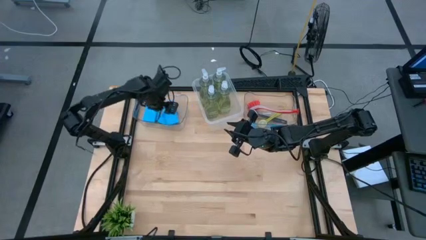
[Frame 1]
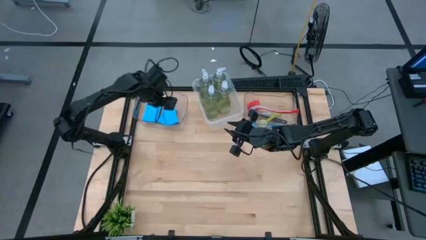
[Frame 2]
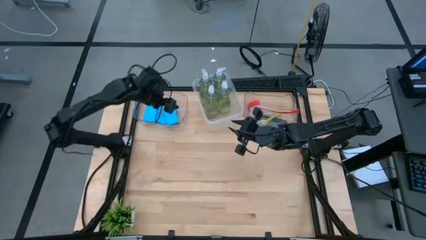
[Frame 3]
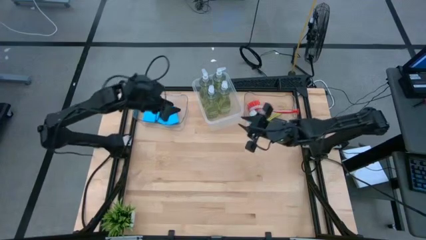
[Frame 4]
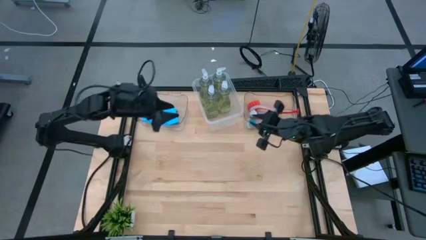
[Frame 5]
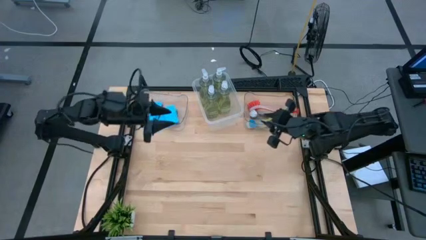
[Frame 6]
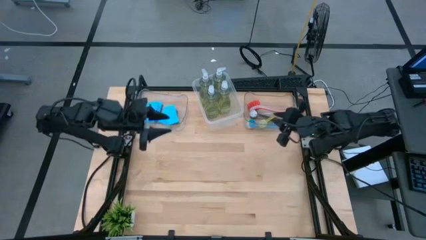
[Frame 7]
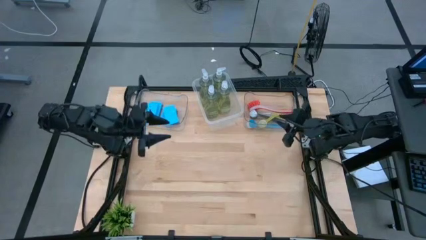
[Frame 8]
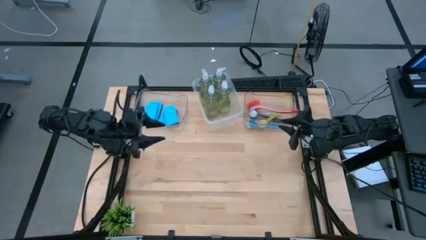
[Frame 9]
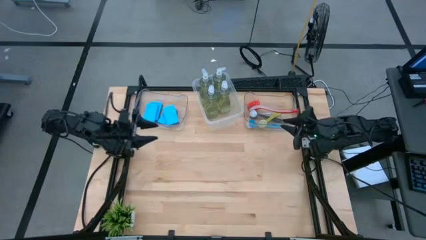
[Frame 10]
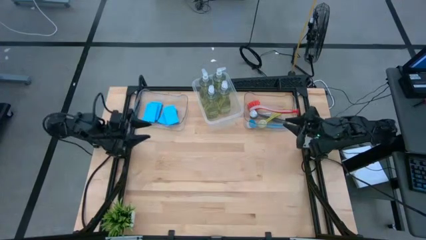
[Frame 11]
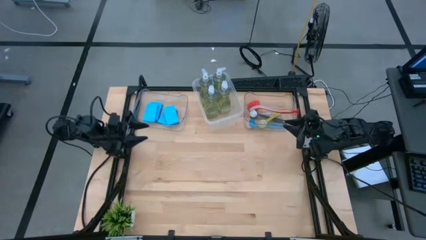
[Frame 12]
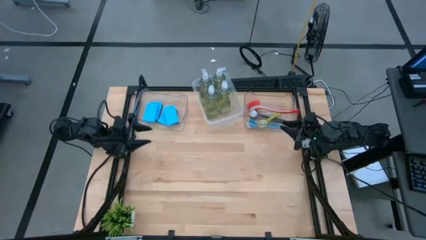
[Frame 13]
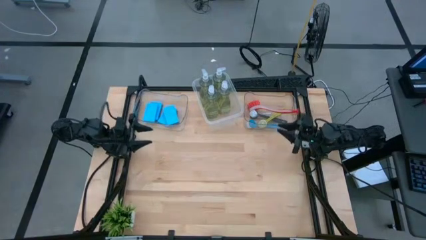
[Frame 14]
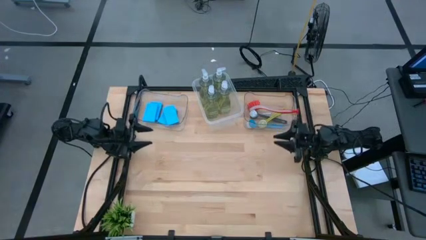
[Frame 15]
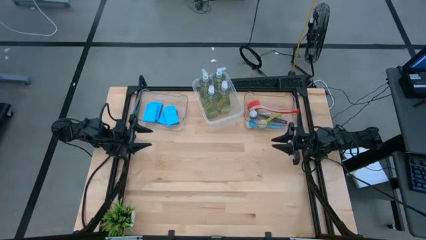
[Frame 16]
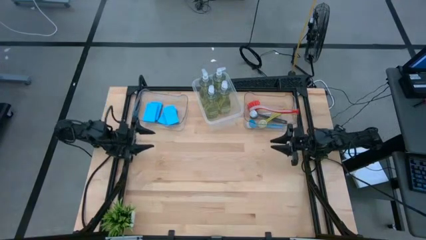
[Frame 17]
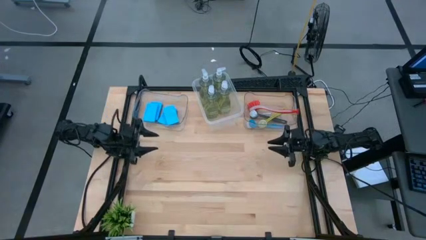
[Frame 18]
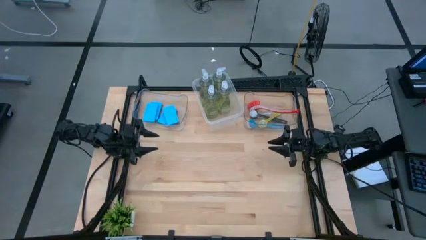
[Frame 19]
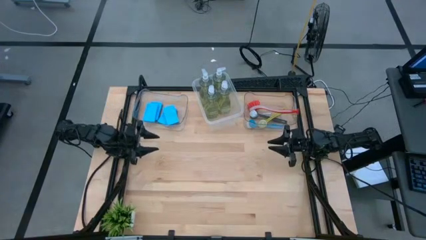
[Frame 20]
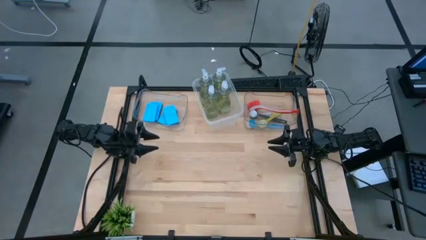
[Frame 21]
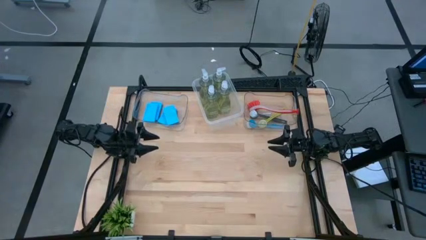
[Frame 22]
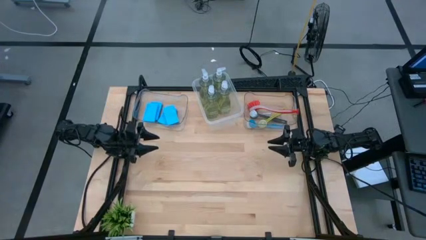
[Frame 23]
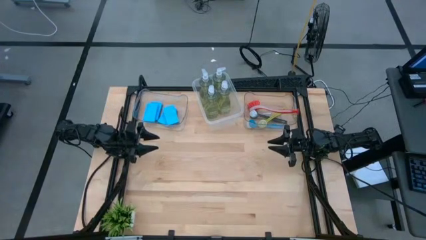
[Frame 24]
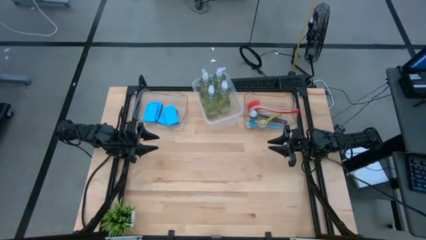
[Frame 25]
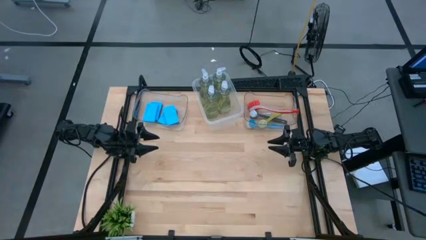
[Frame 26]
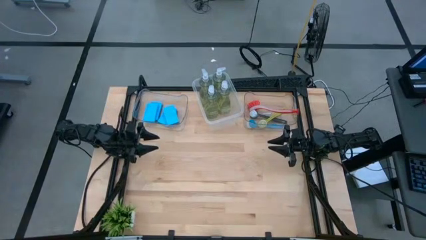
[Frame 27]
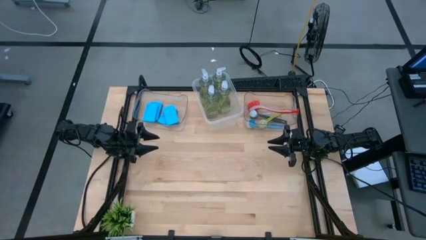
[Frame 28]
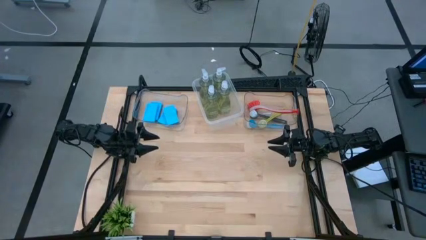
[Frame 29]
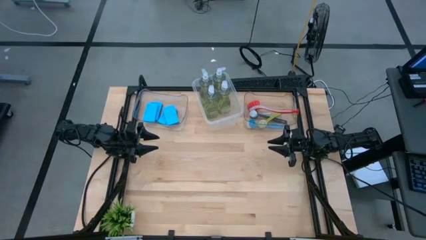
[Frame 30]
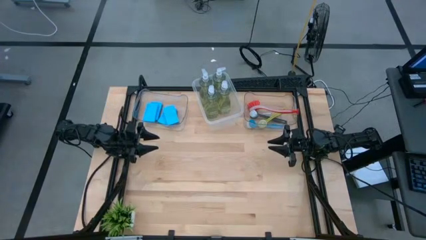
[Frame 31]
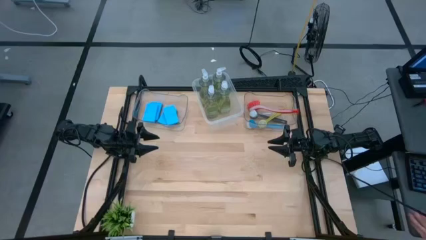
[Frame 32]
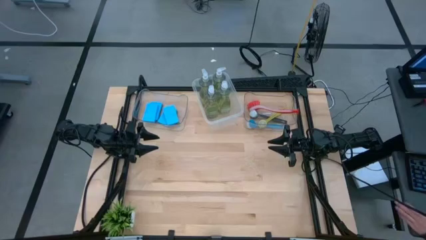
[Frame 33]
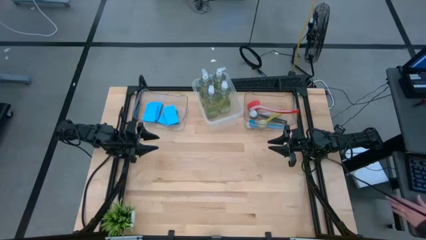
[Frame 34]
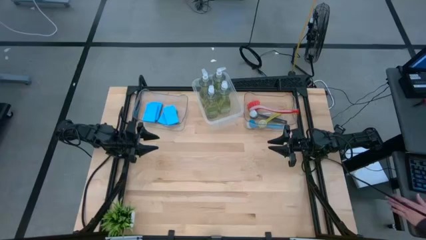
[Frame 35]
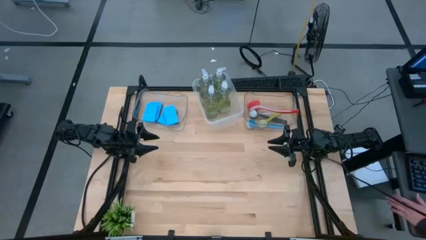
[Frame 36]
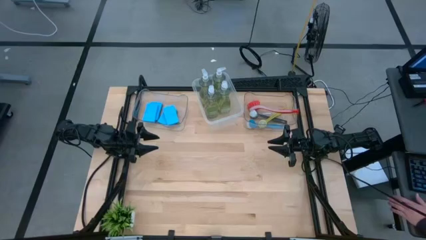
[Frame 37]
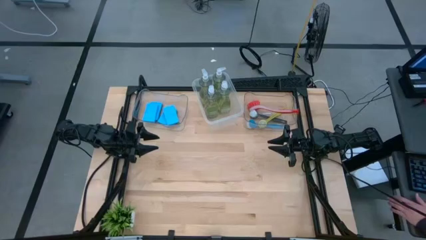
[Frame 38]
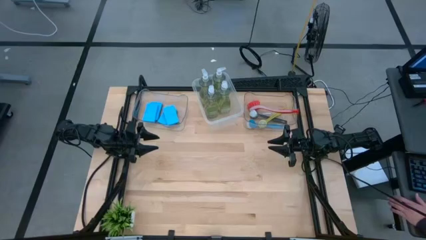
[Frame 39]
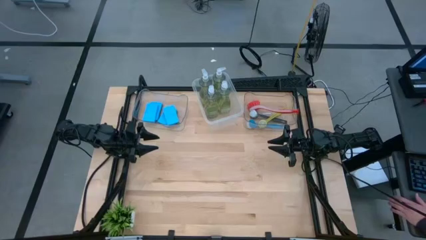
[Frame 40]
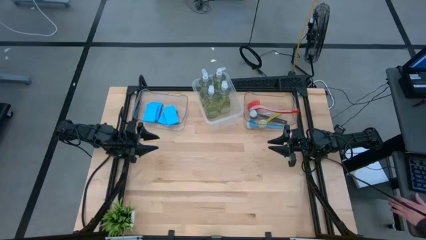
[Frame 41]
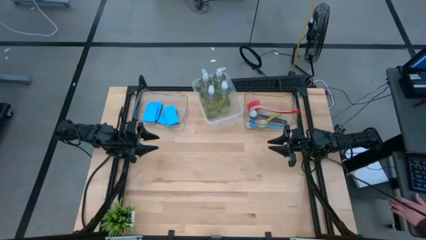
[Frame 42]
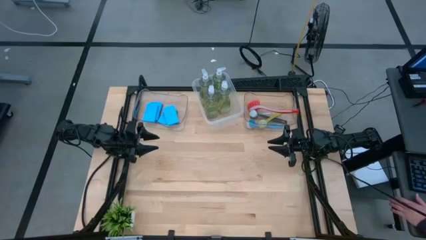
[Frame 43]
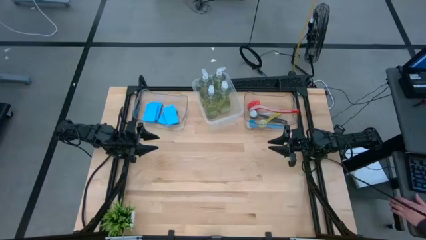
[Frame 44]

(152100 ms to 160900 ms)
Task: Pick & Place Kitchen Sink Supplies
Return to Home Position
